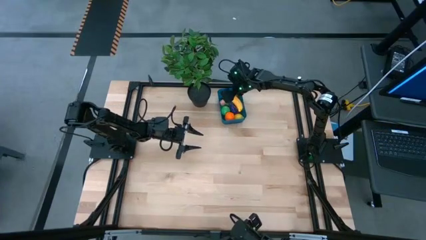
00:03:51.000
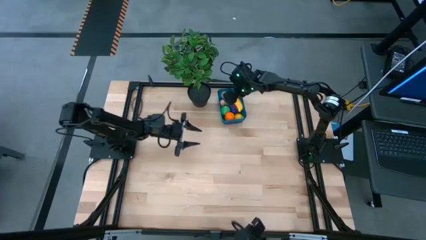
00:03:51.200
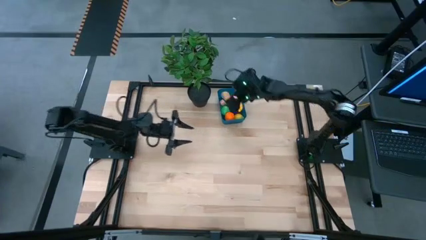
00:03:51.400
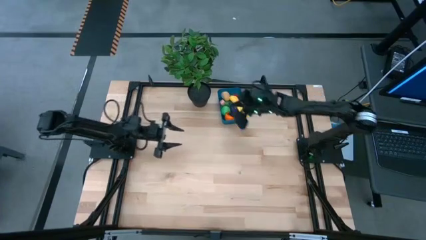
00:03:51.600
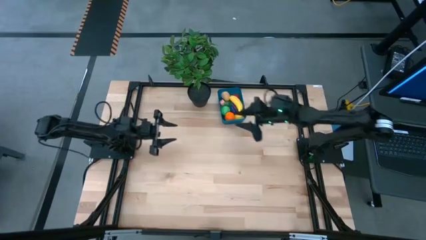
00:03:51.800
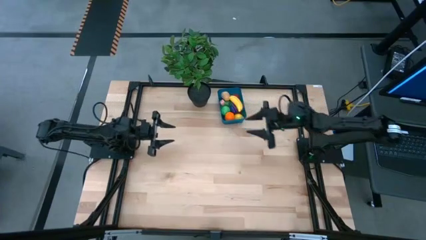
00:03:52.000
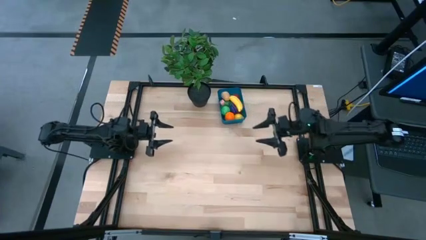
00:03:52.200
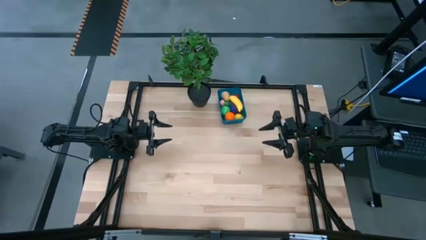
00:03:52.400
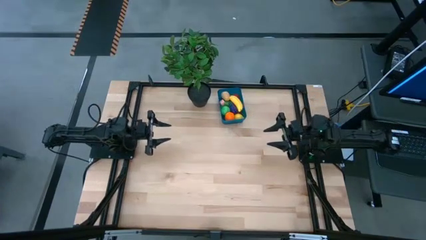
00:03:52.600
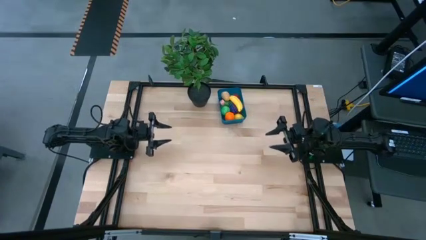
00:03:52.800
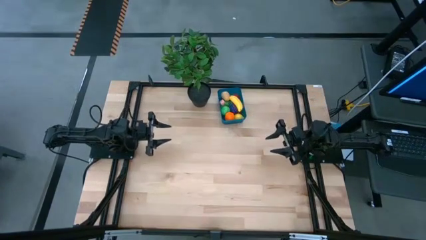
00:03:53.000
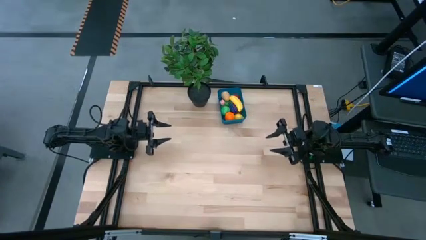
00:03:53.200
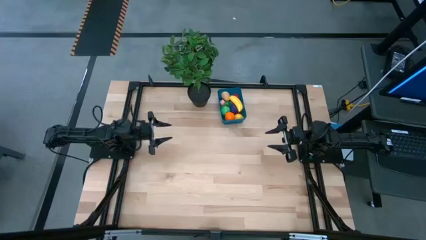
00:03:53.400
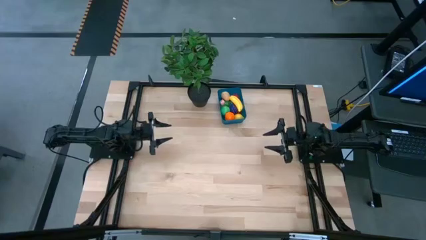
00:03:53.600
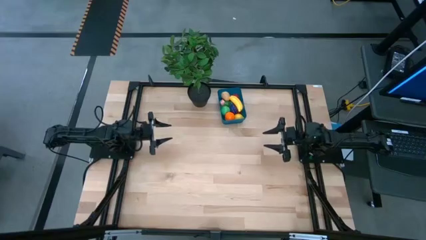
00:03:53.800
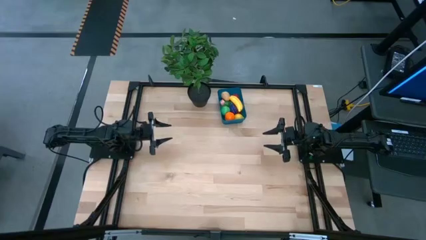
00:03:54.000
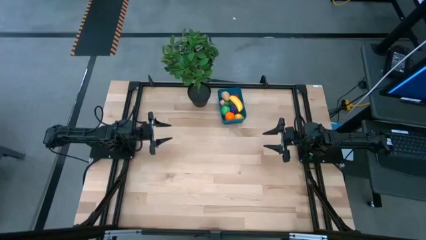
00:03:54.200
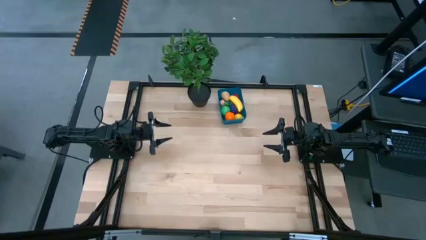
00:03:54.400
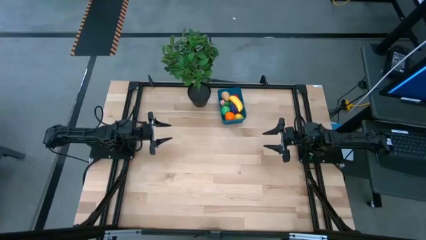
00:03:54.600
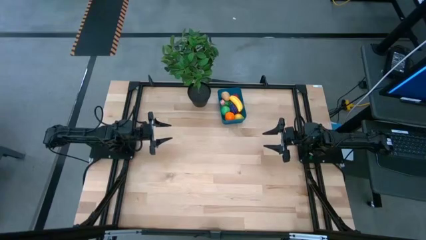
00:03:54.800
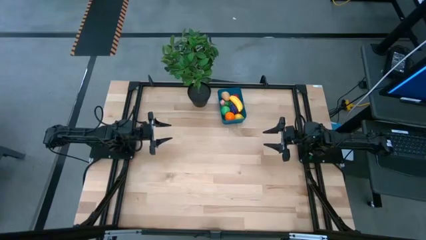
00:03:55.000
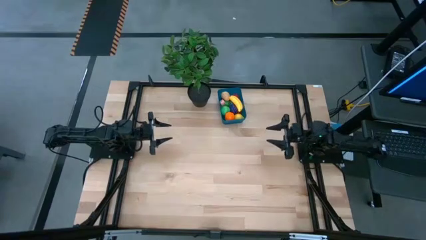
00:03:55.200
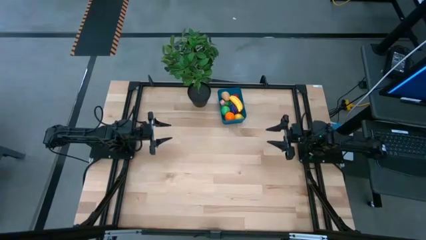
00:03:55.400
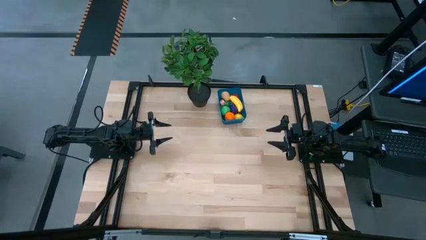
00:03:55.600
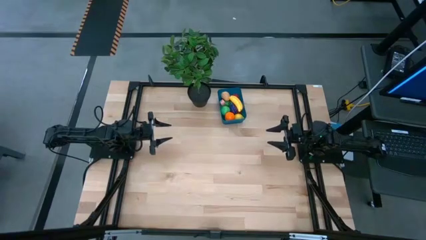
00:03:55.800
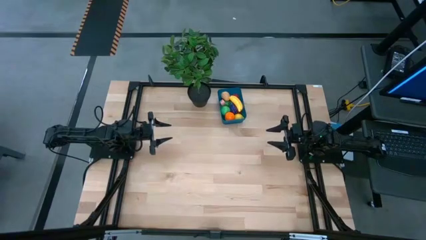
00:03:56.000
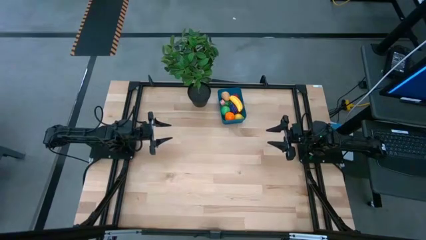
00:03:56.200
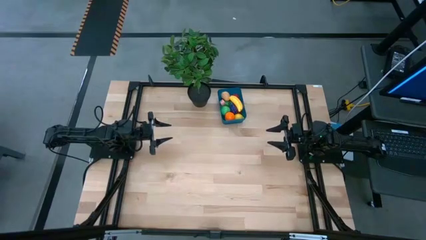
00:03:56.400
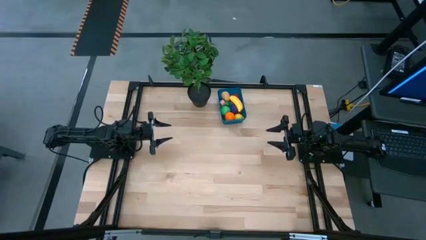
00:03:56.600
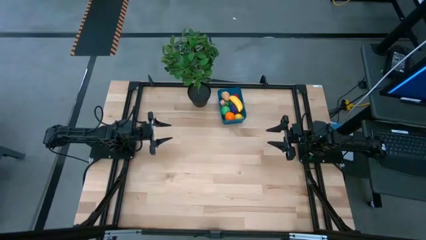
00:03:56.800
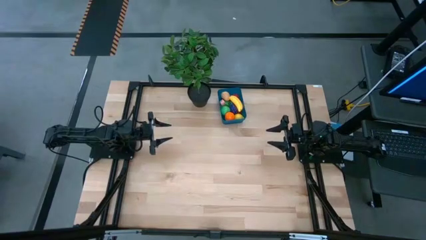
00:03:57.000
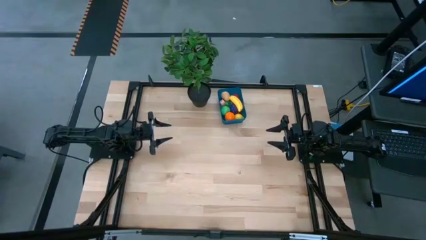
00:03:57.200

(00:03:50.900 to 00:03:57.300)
Task: Pick and placing Produce into tupperware
Return to Home Position

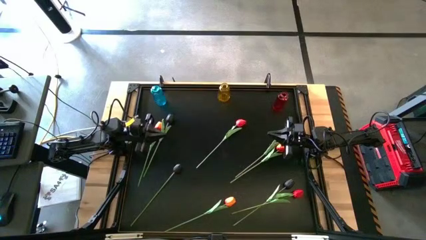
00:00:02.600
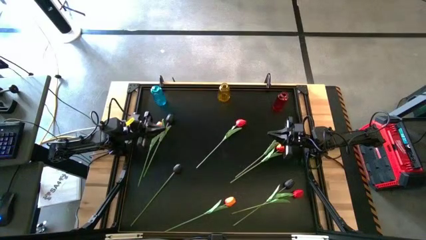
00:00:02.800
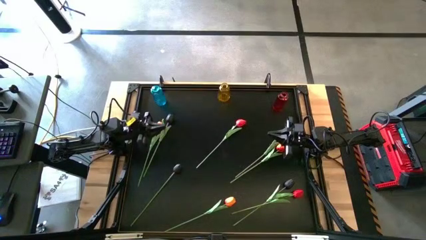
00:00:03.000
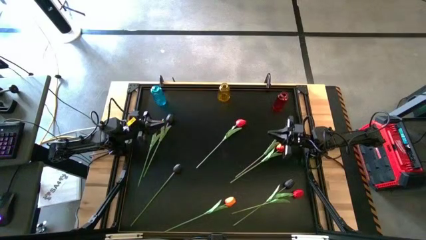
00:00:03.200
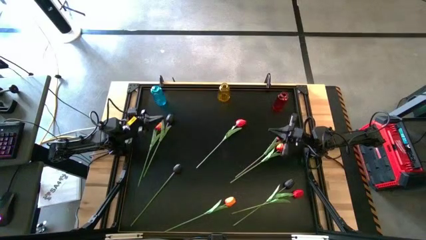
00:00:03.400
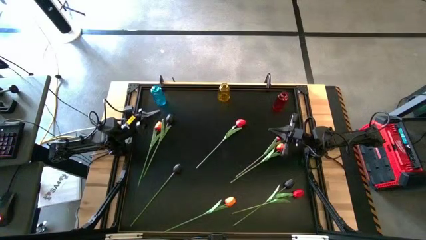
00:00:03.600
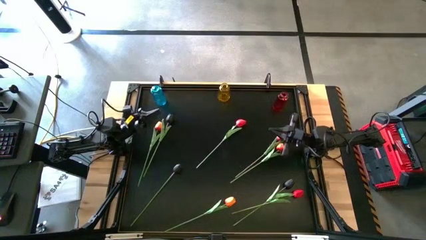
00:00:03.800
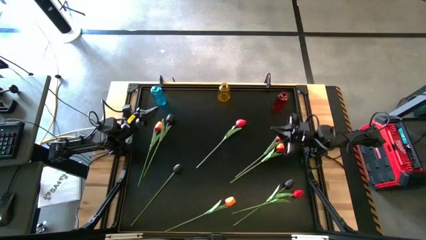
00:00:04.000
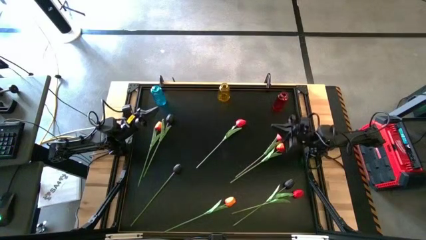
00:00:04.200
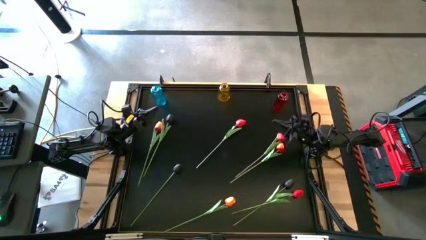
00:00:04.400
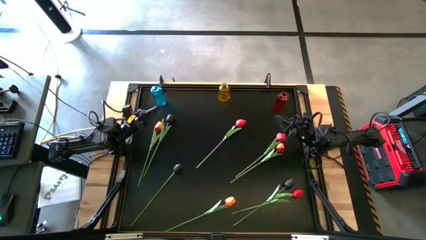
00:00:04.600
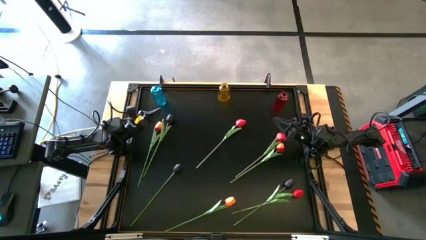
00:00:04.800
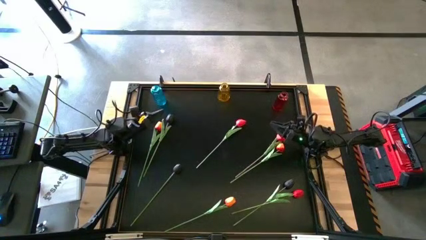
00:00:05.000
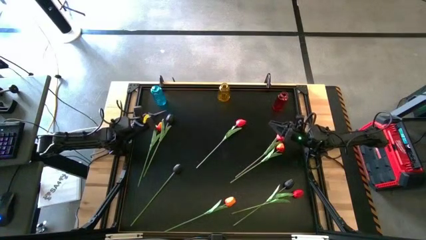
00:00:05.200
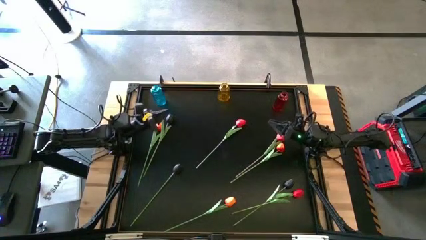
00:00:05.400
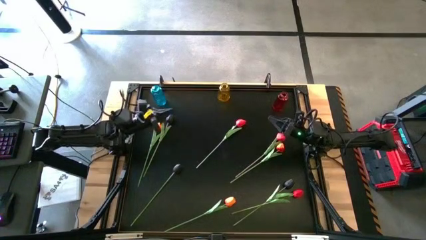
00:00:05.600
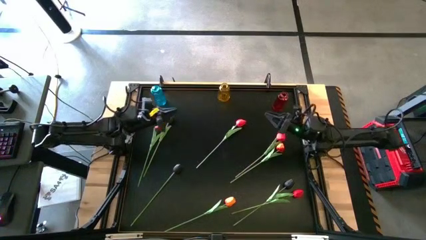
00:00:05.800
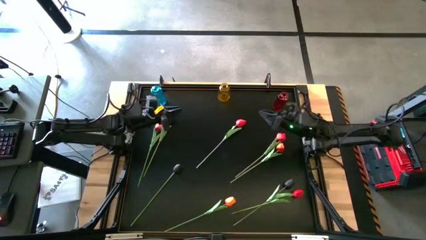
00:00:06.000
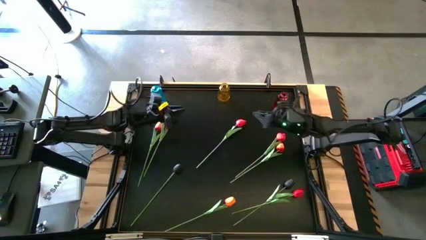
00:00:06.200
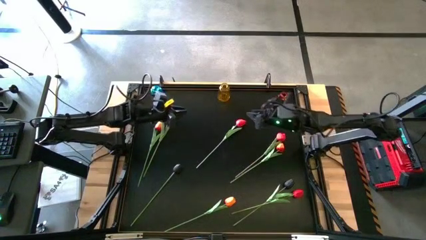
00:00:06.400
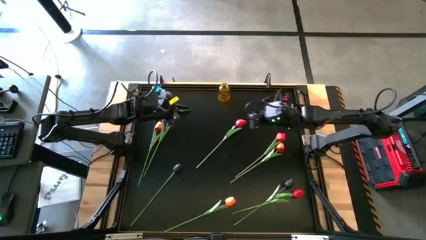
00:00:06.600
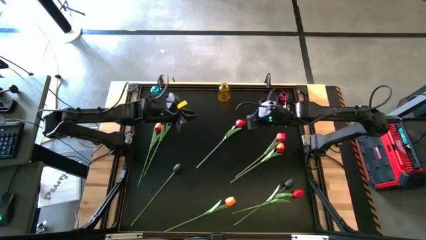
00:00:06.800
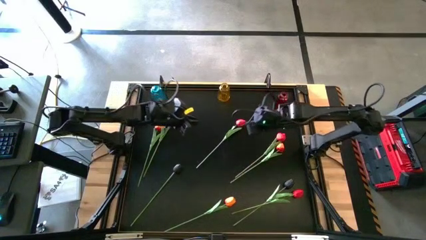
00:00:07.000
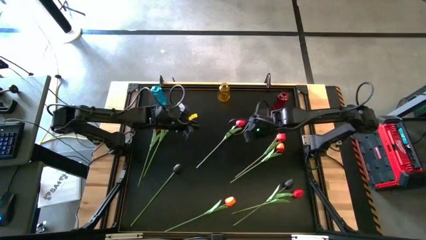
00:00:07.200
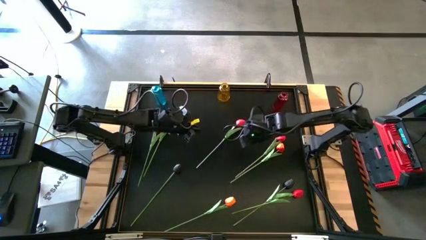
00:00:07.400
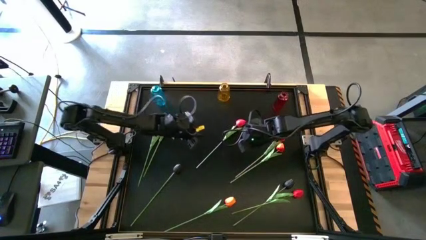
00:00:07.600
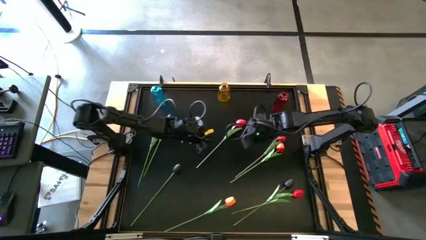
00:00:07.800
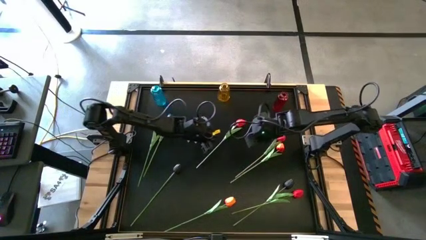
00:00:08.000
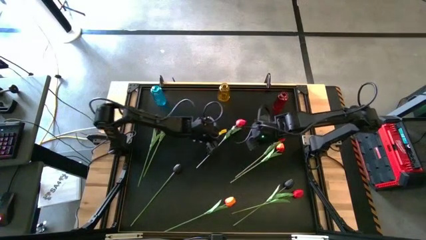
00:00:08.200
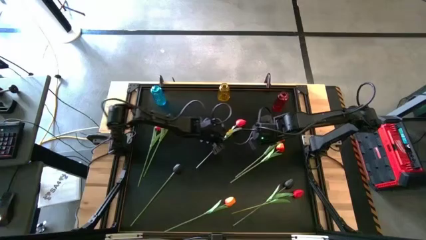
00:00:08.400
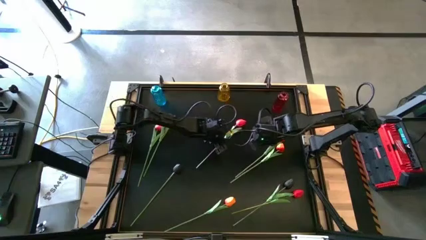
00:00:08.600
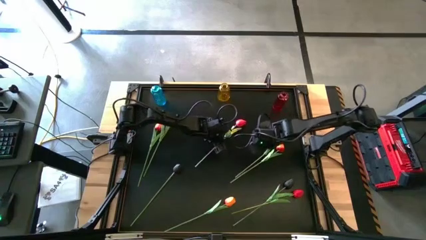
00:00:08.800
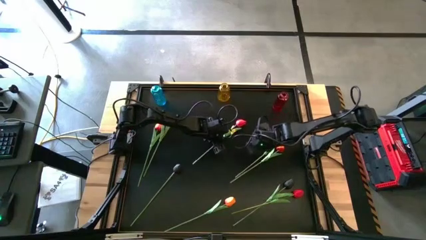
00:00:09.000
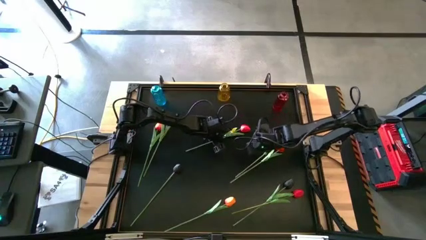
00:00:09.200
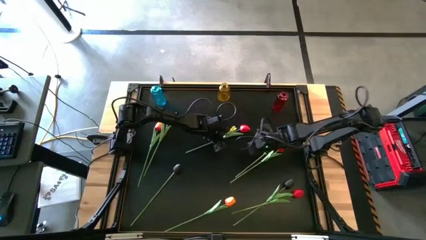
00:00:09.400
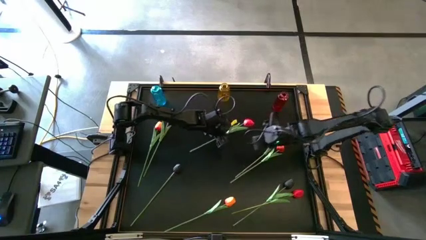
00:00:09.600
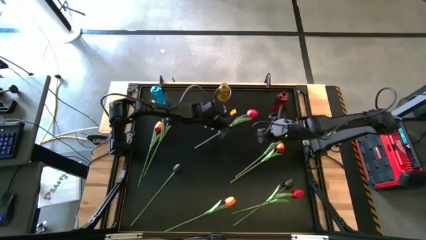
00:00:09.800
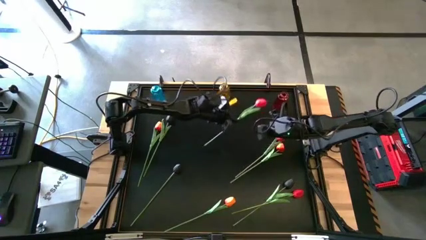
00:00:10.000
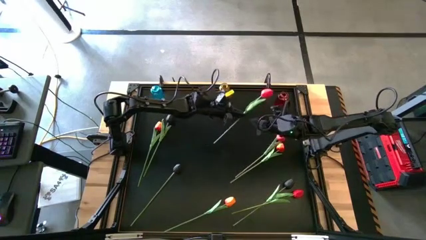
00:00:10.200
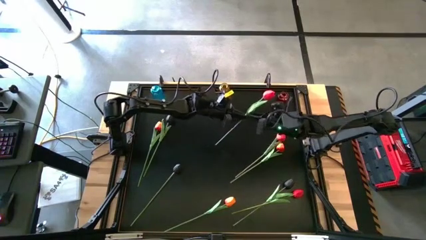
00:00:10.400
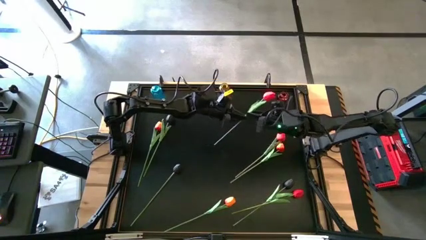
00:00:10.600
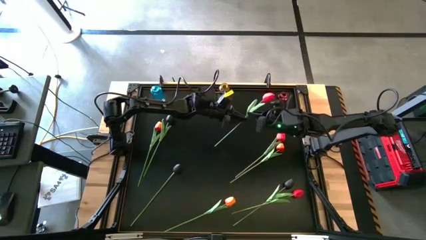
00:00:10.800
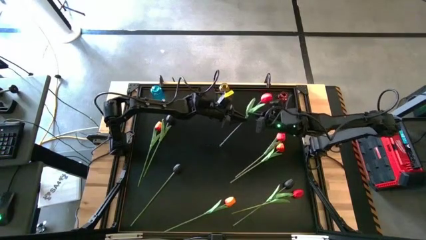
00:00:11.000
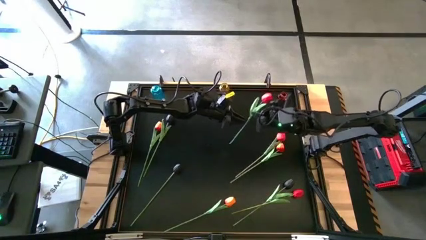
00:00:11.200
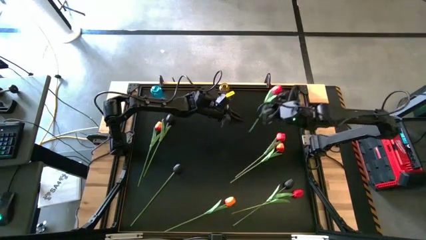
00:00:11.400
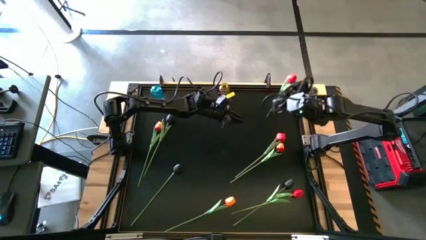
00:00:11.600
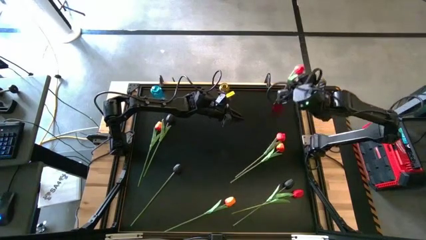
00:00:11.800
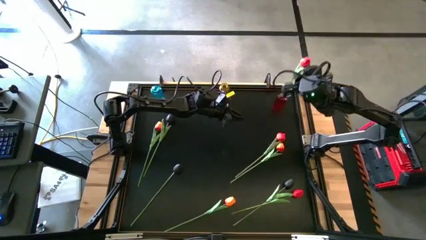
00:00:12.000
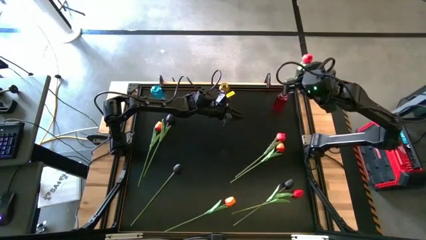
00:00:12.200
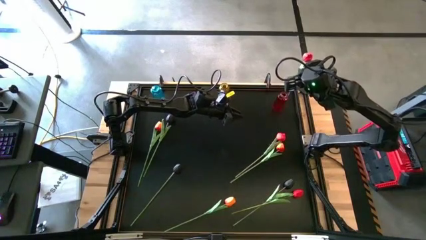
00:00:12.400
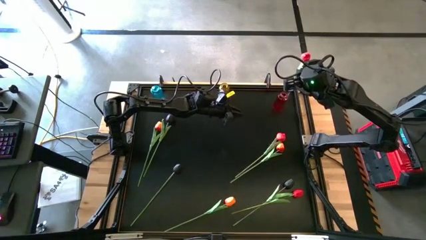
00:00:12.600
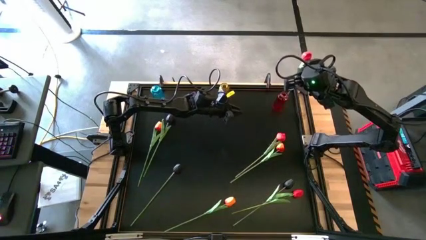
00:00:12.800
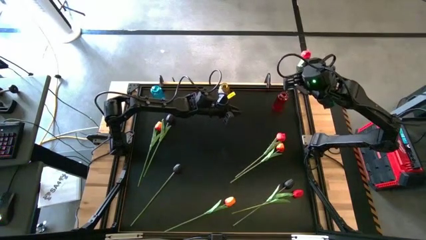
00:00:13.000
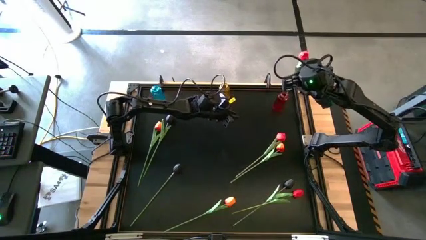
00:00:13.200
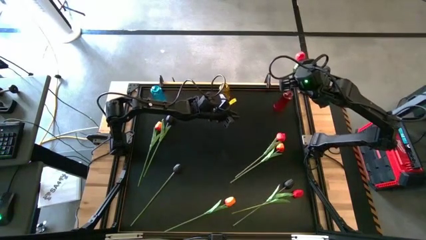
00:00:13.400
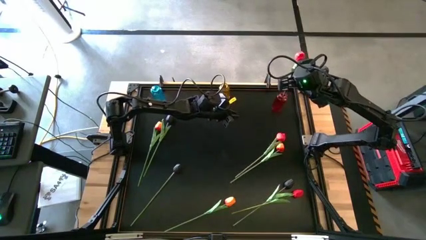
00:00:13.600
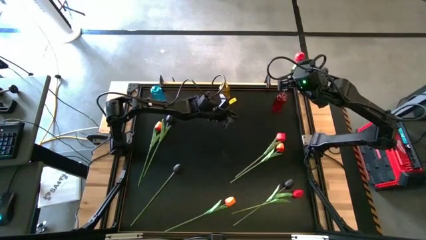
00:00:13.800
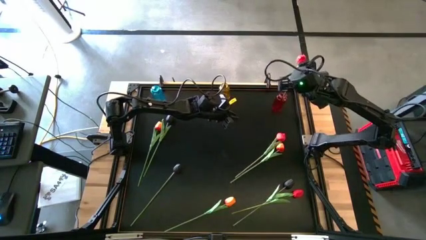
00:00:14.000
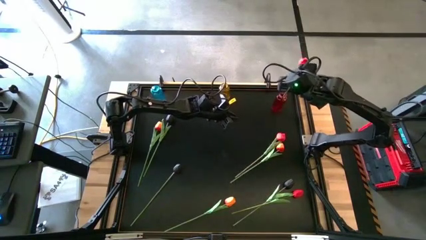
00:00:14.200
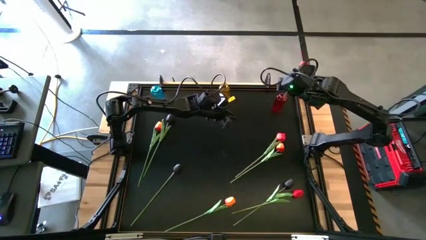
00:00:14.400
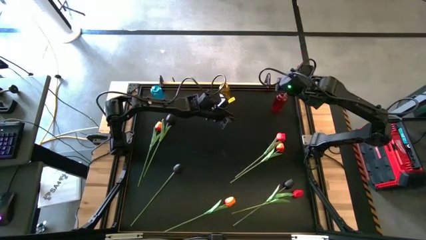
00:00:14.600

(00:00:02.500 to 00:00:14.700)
Task: Sort flowers into vase by color
Put the top red flower into the red vase
